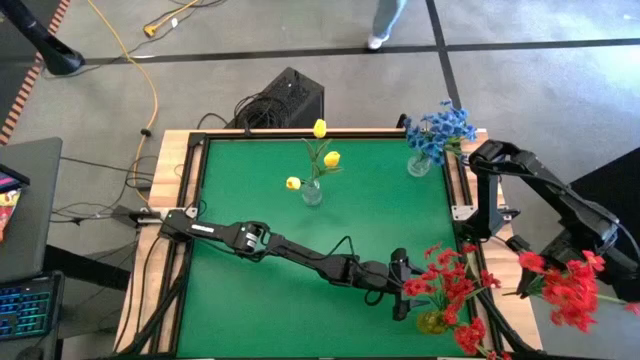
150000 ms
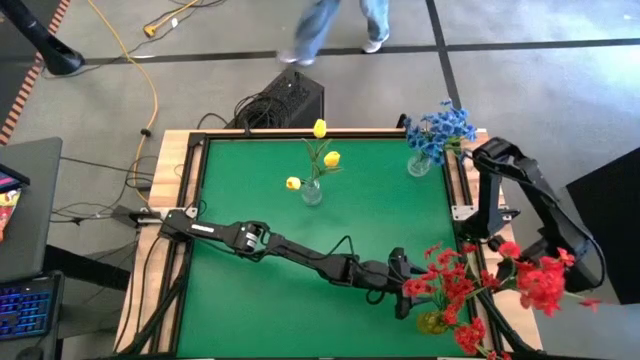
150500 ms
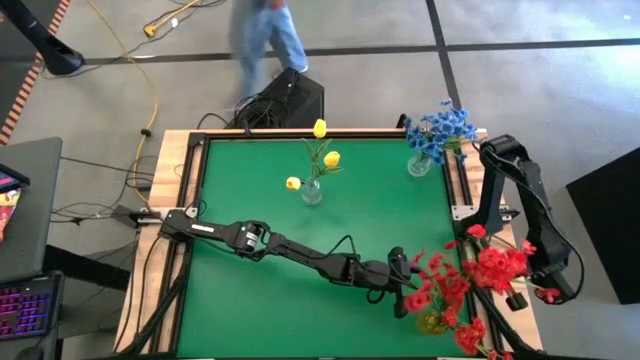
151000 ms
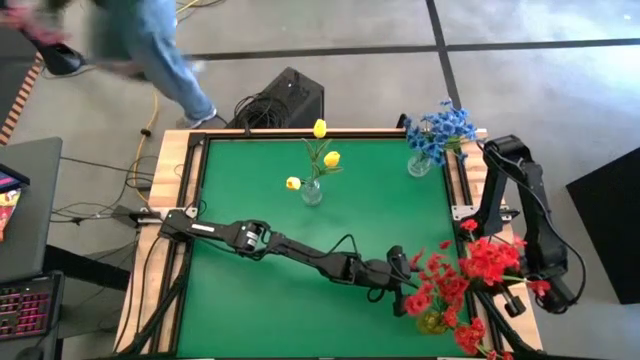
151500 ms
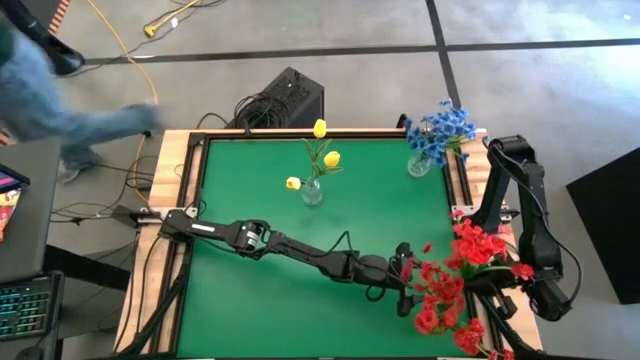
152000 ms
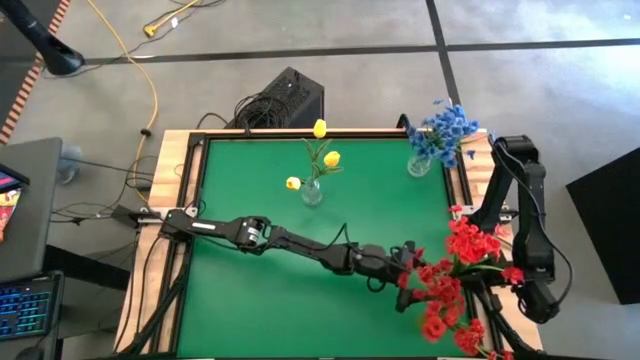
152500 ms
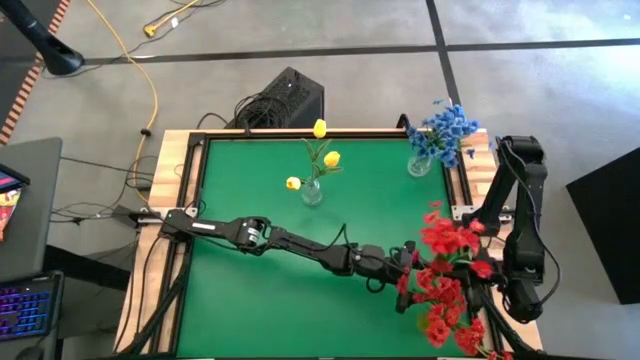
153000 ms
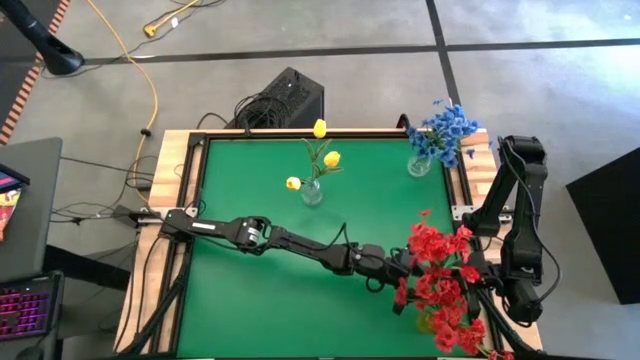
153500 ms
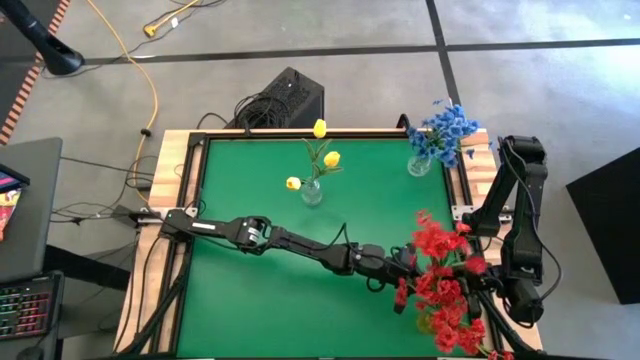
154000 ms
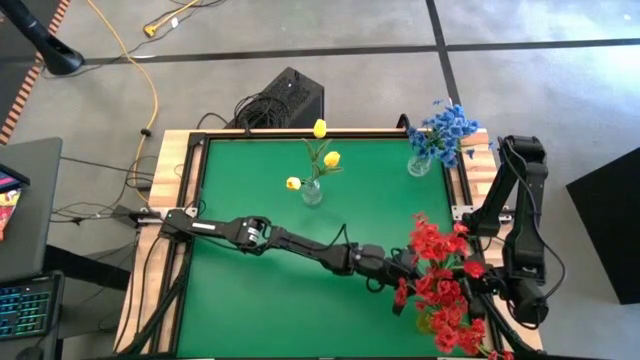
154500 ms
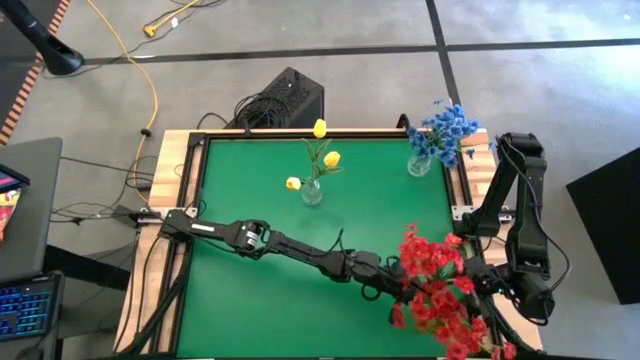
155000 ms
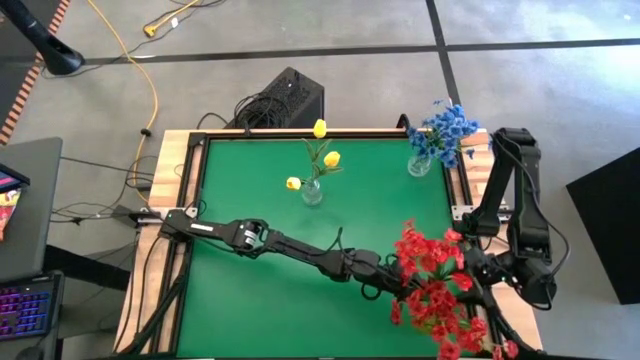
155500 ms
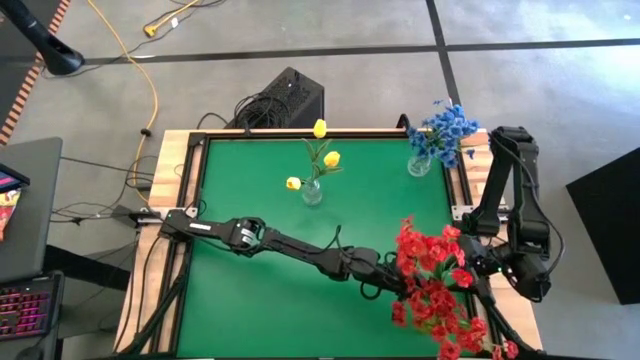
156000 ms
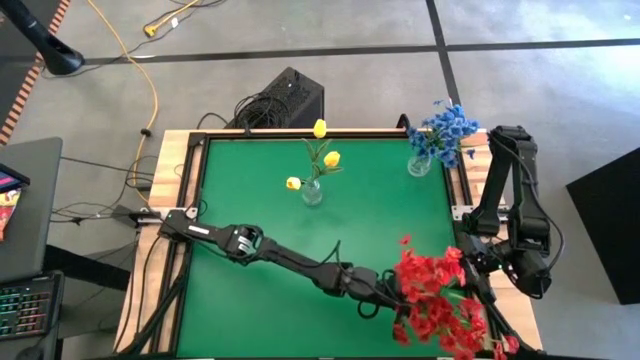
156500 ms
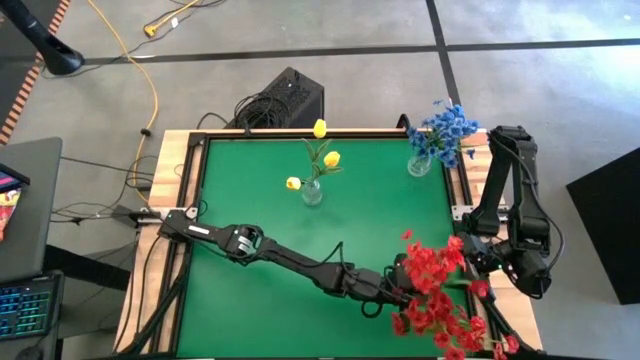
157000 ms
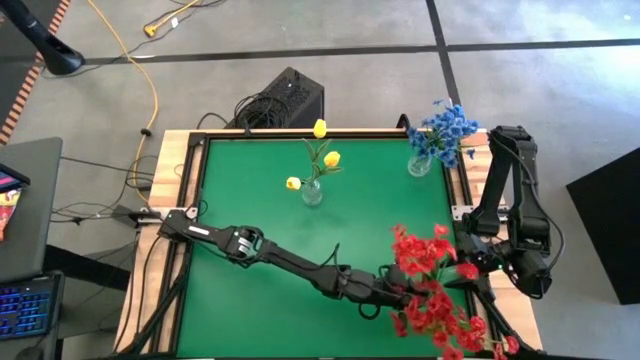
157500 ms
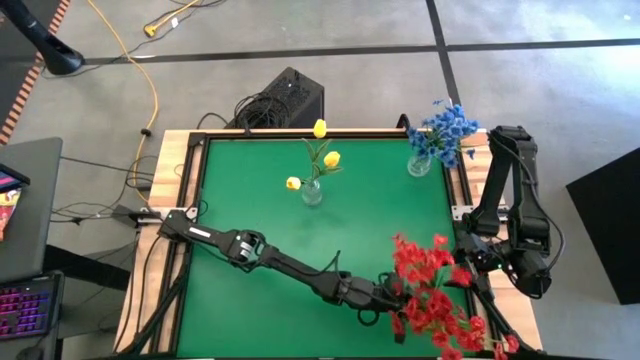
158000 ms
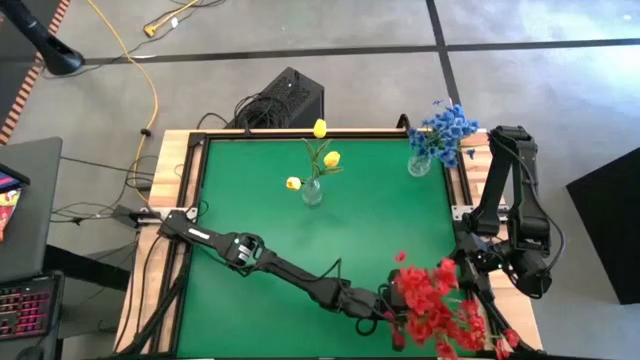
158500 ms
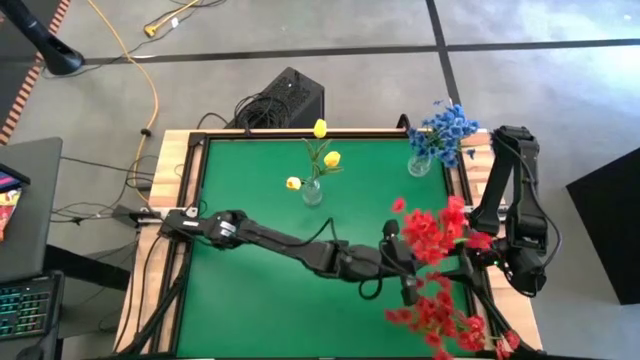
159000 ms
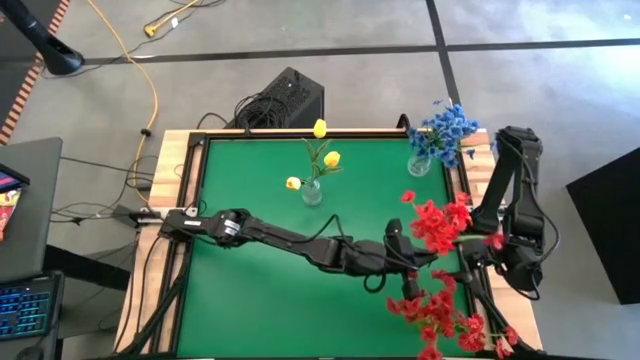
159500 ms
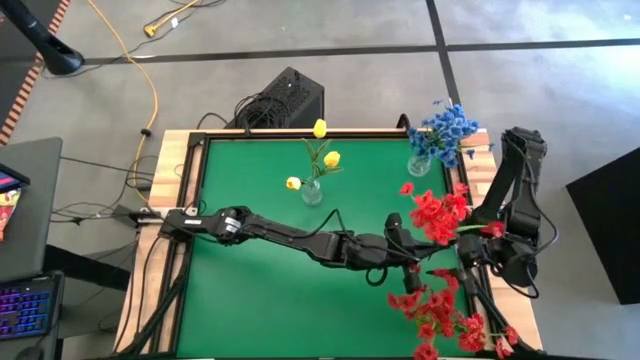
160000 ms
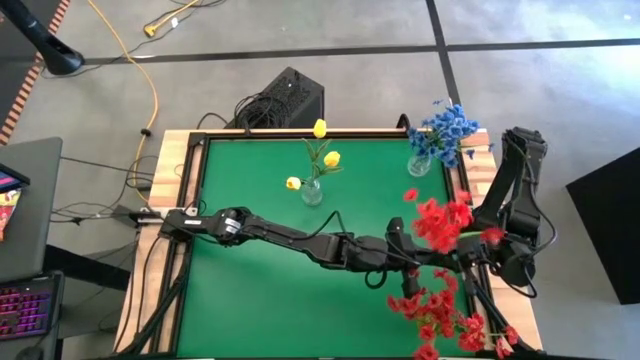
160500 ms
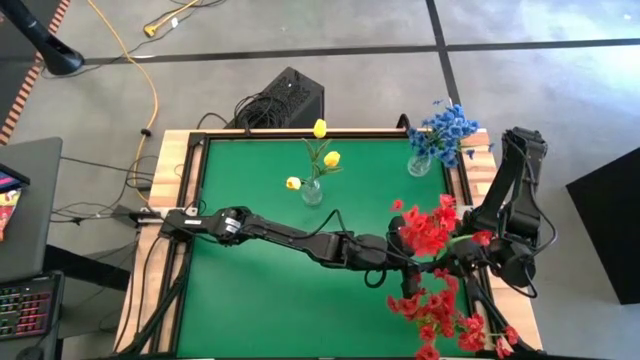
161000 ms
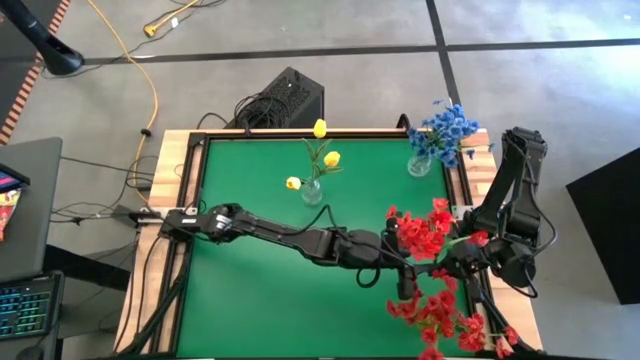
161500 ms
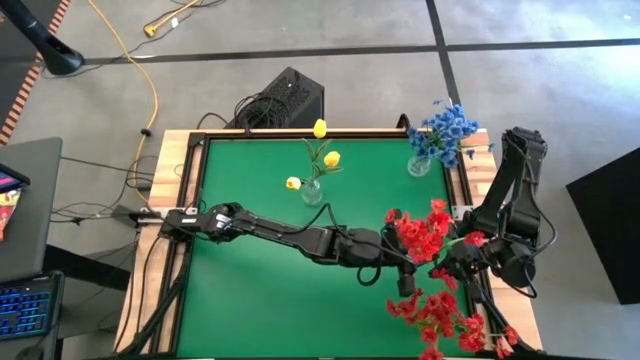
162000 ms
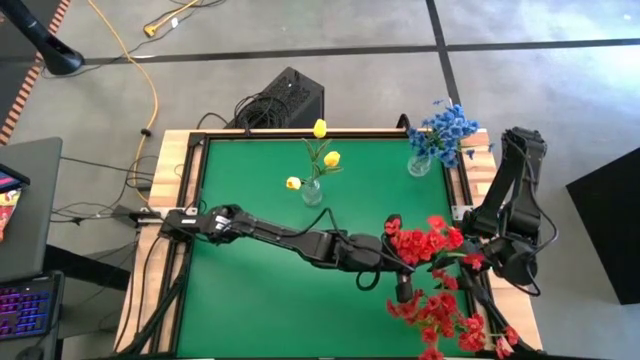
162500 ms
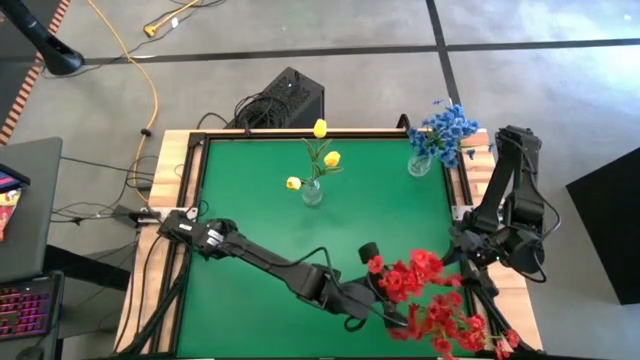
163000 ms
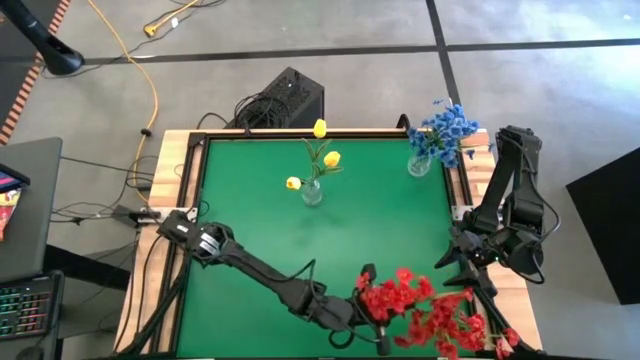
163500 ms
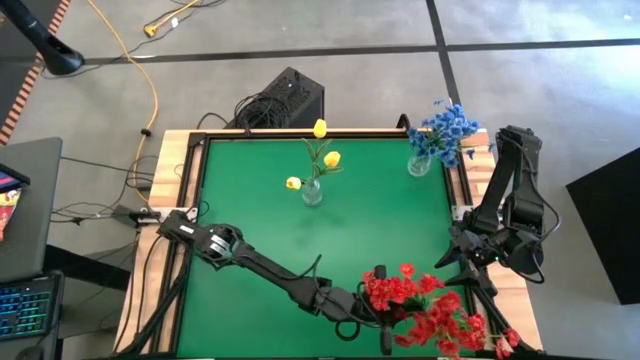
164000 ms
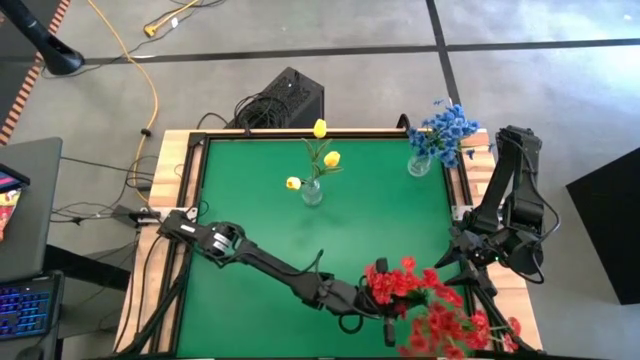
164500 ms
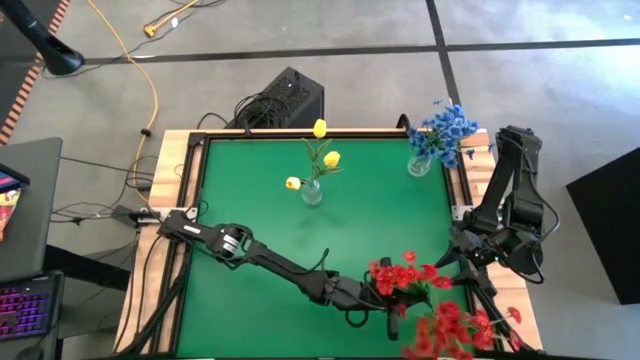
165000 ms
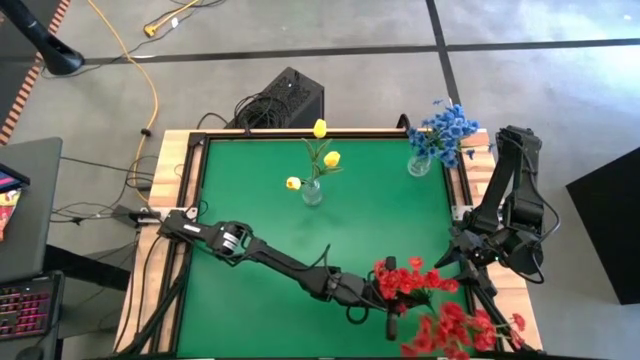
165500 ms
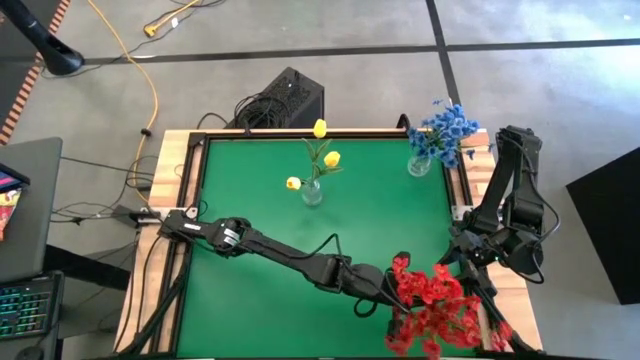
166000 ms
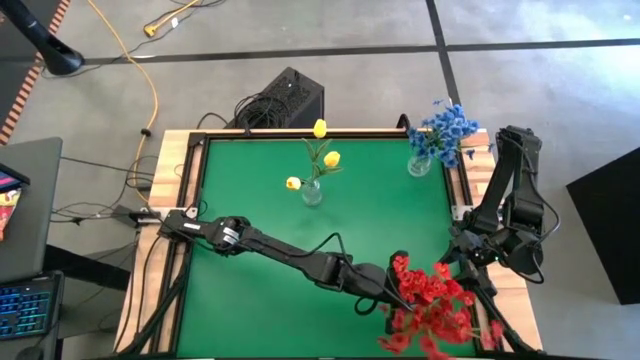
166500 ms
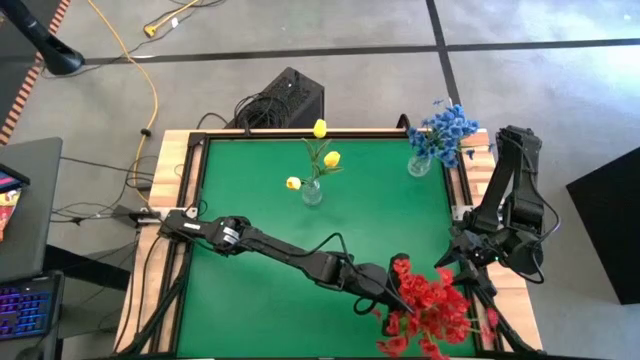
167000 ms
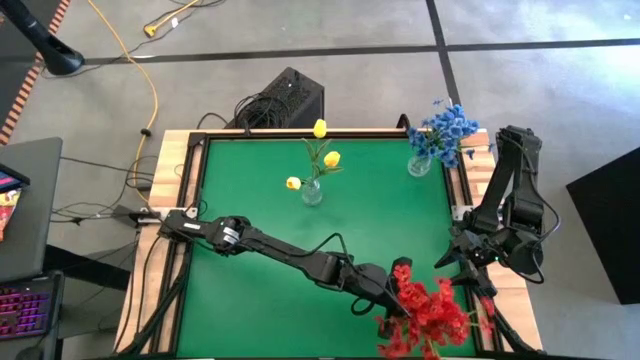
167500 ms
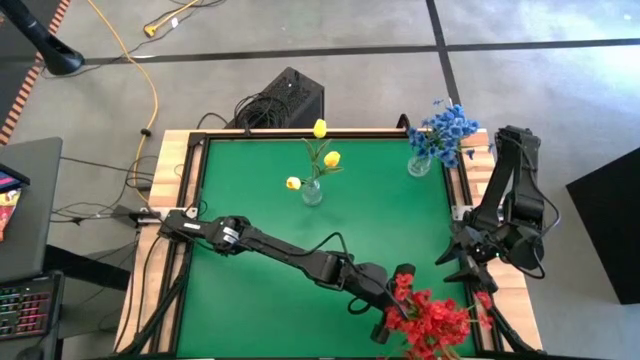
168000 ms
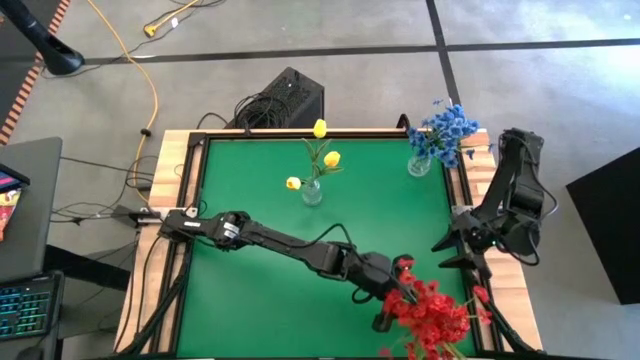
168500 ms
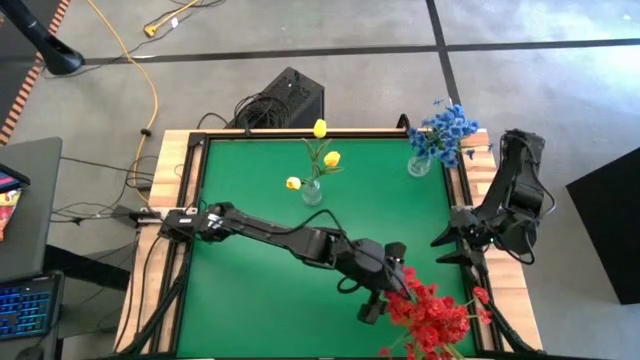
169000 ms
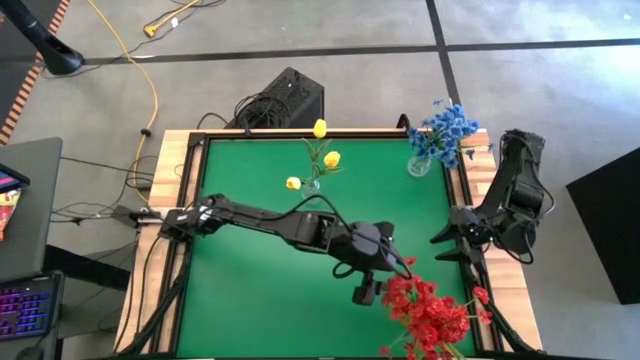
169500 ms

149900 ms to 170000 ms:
Task: Sort flowers into vase by color
Put the red flowers into the yellow vase

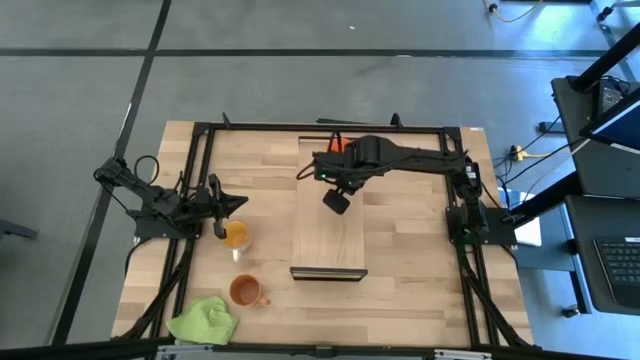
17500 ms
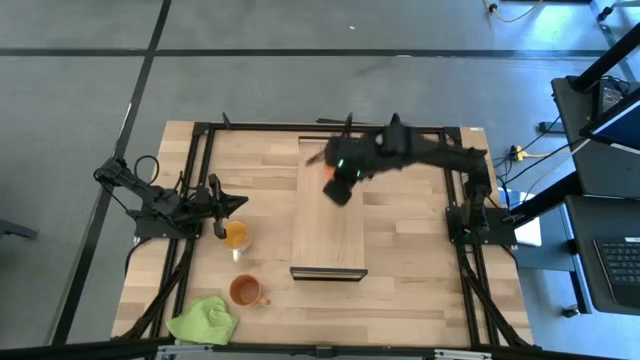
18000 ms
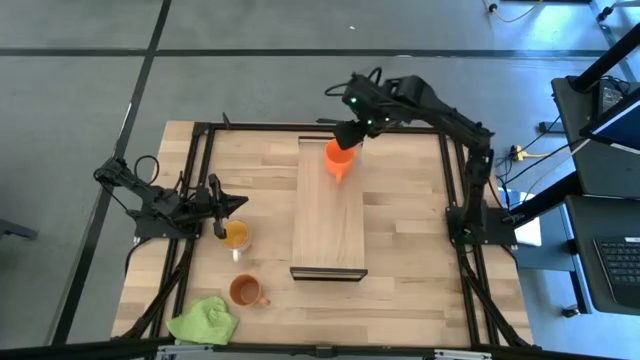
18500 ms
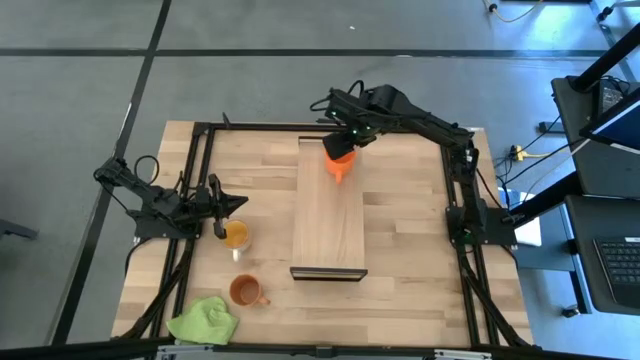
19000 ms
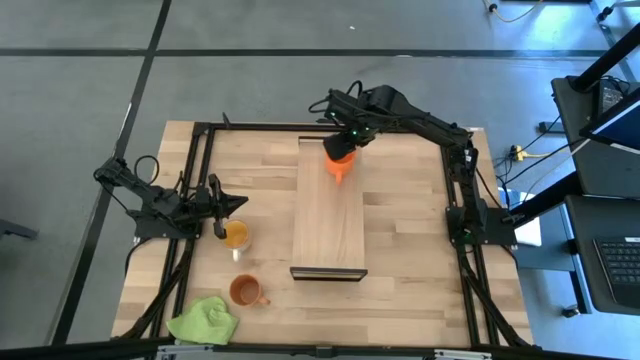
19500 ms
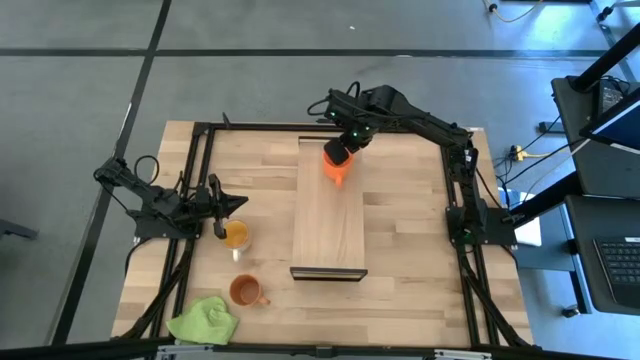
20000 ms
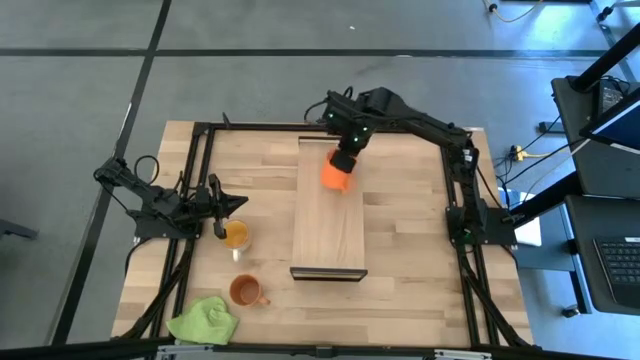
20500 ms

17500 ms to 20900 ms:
Task: Stack small to large cups/mugs on shelf
Adjust the orange mug on the shelf
